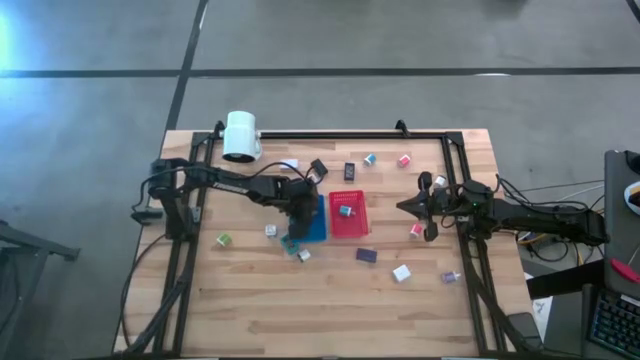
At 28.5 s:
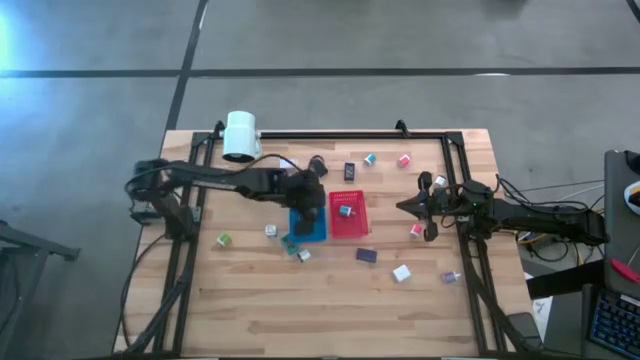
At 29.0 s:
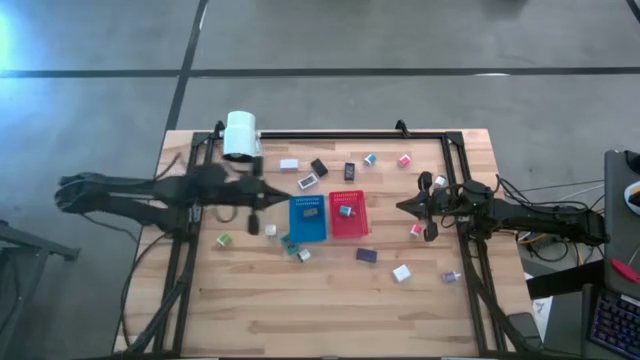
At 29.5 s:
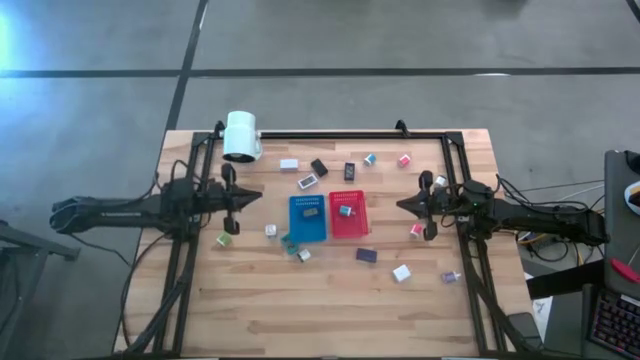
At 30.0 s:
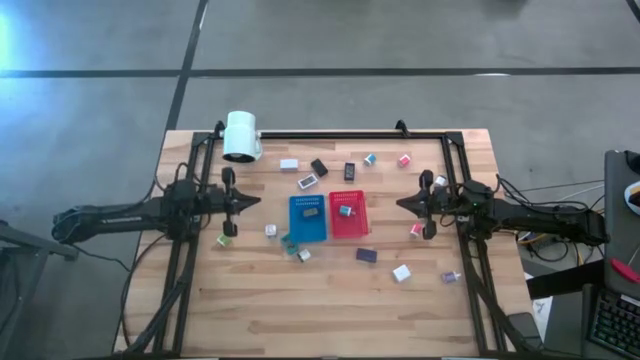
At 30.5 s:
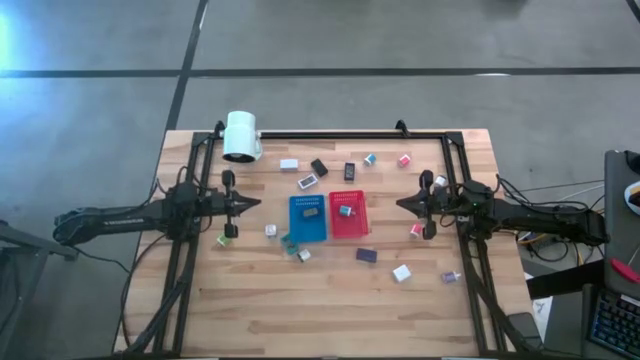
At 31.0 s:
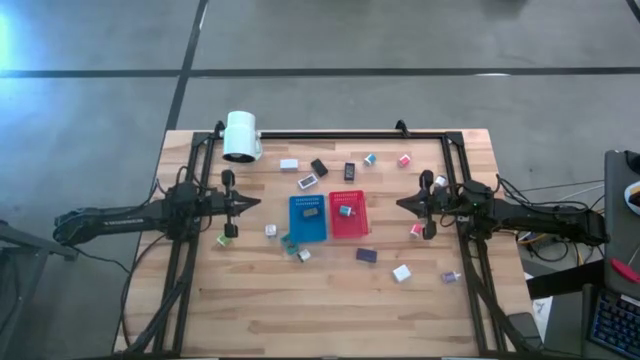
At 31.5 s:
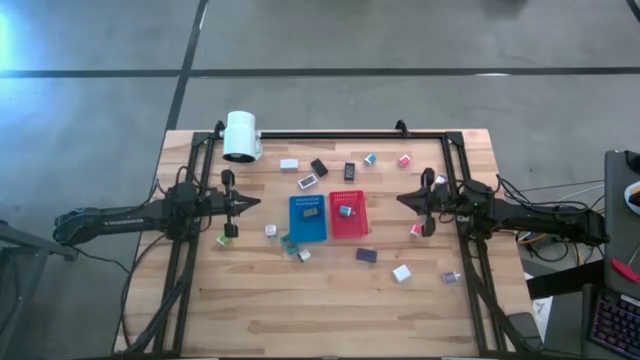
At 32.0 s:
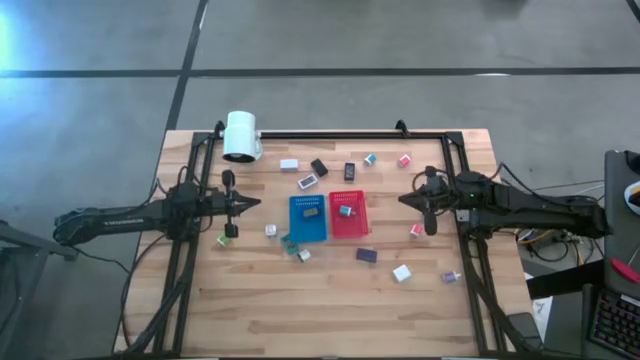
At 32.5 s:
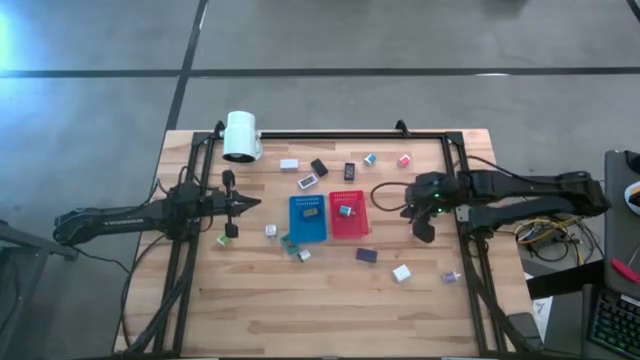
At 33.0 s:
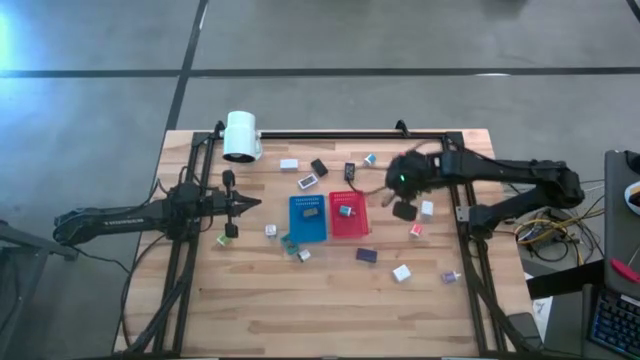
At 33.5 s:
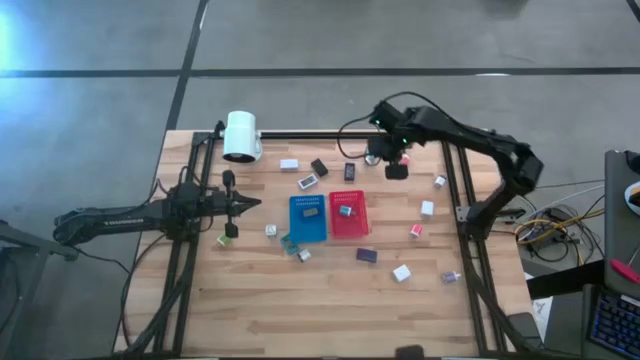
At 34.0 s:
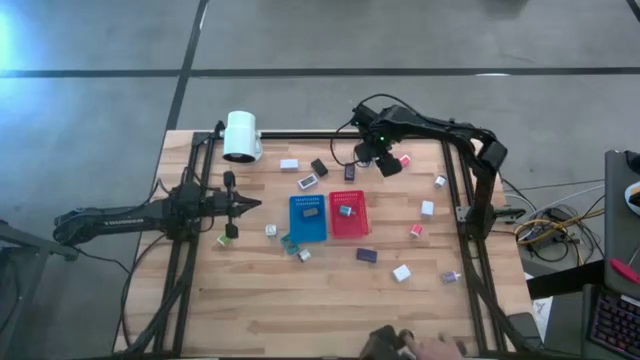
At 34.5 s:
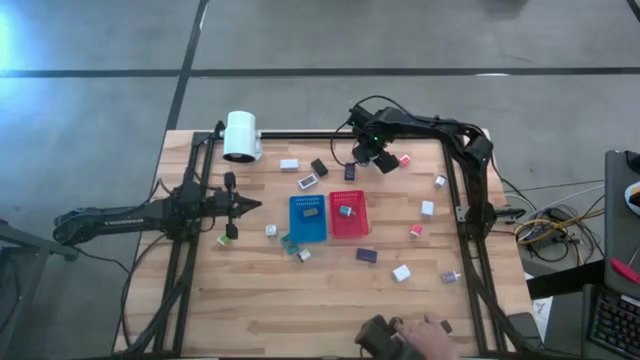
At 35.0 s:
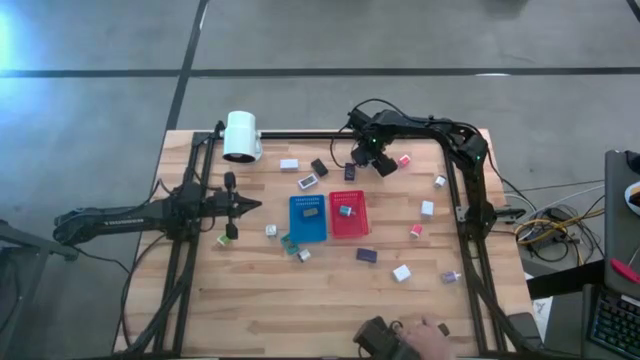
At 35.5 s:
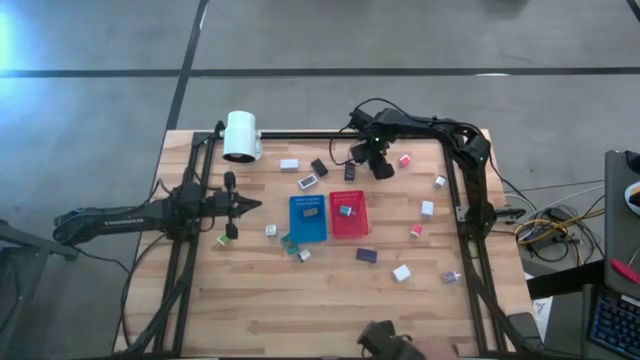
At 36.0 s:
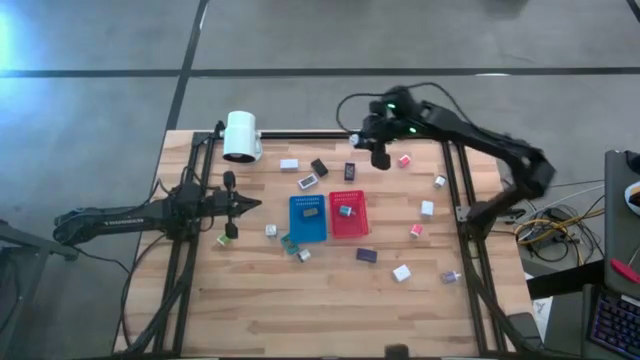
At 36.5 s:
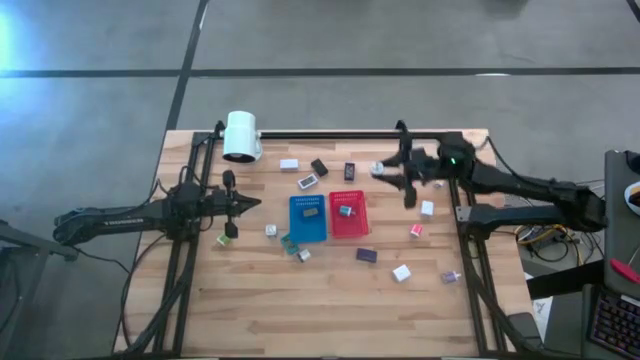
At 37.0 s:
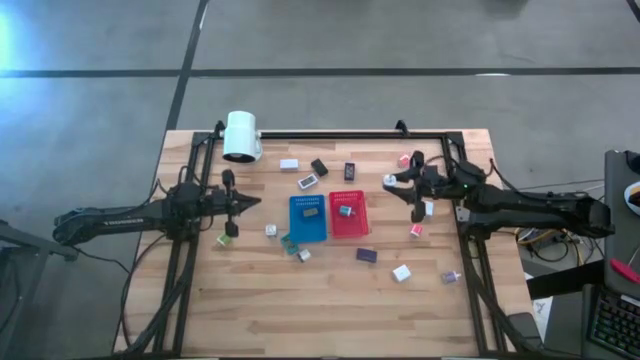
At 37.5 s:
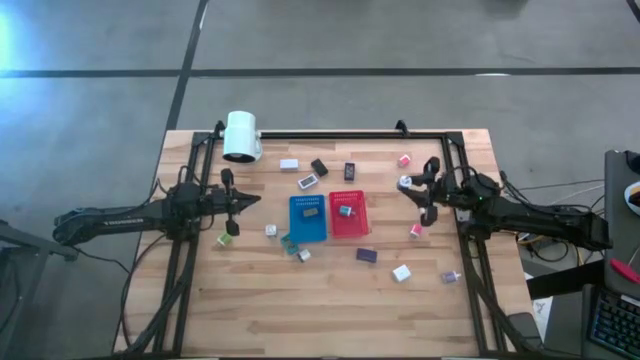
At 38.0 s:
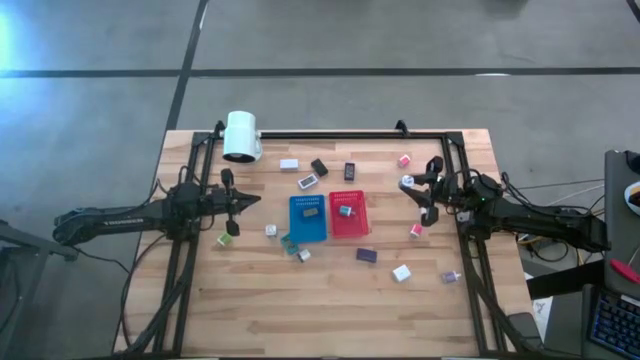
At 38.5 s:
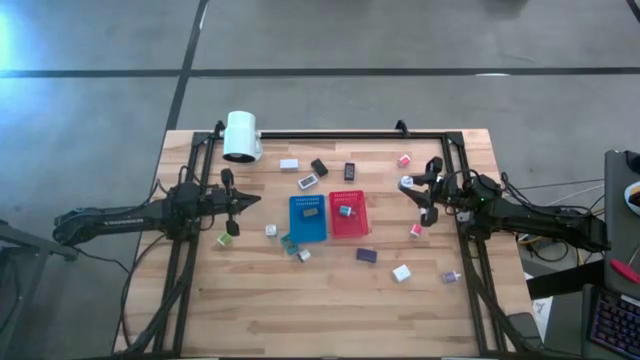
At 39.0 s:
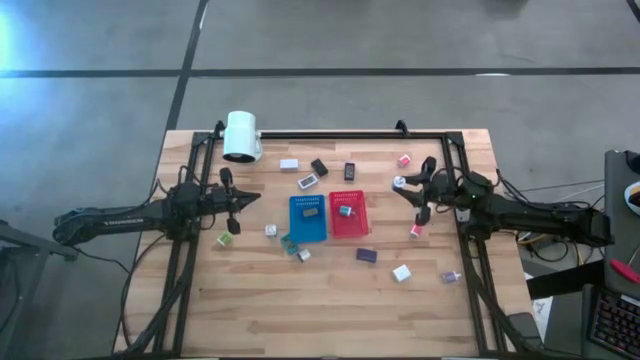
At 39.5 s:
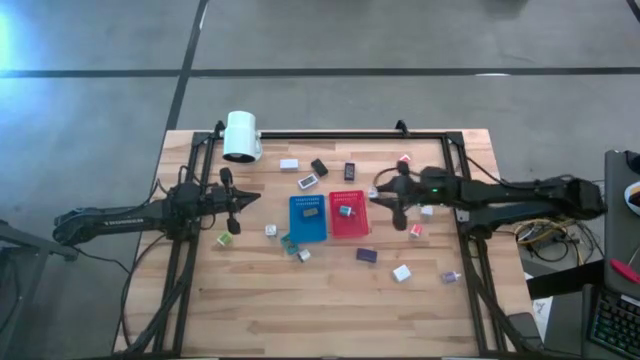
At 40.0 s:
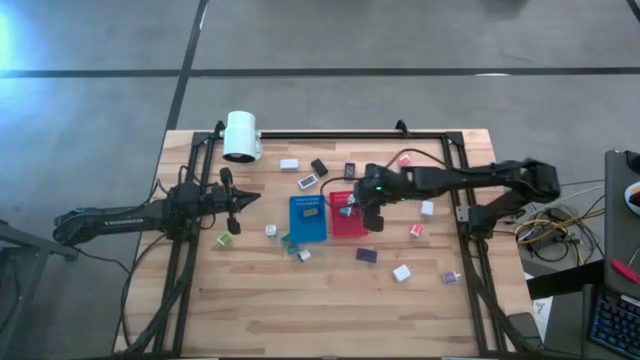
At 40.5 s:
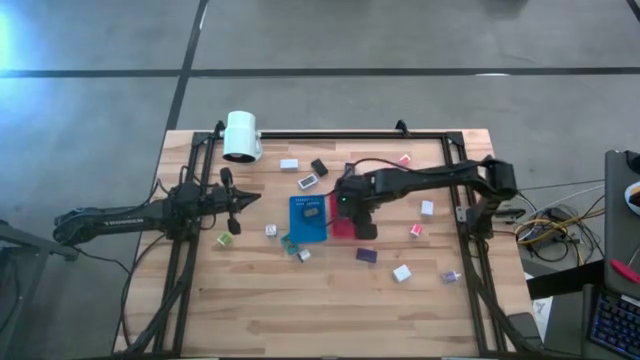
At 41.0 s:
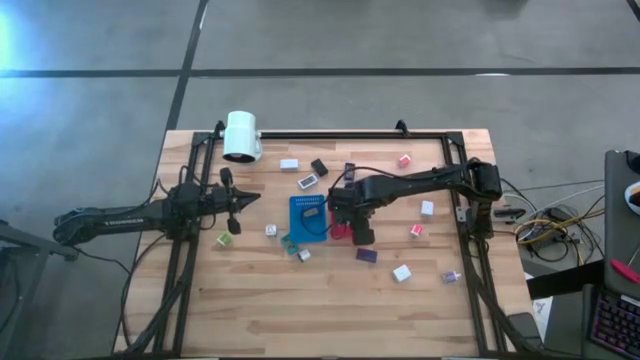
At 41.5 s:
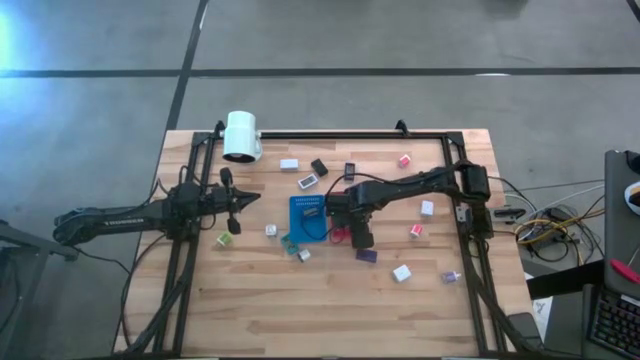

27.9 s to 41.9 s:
Task: Pick & Place Office items
Put the light blue plug charger into the red bin

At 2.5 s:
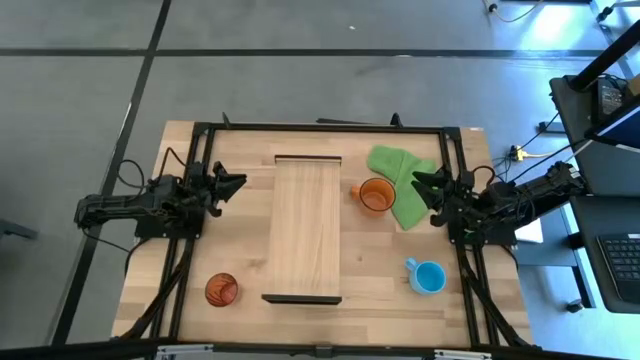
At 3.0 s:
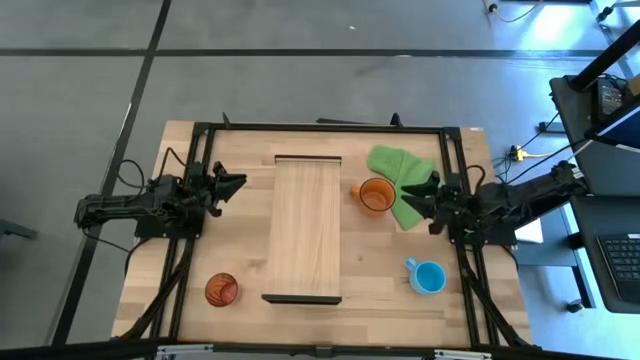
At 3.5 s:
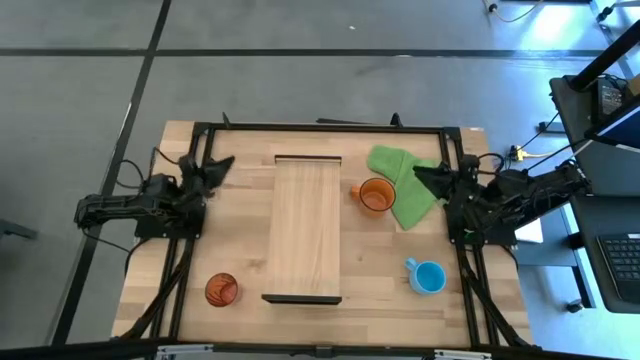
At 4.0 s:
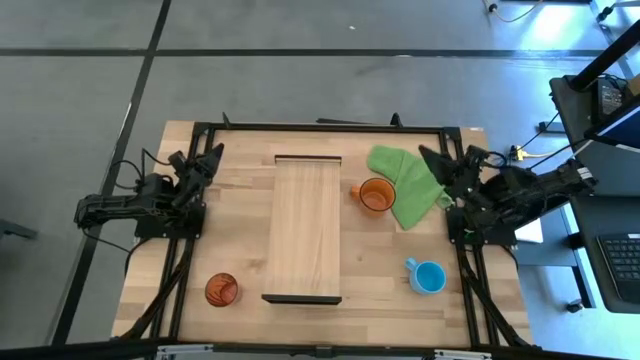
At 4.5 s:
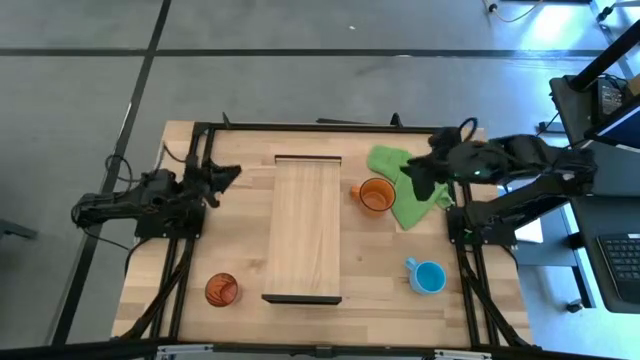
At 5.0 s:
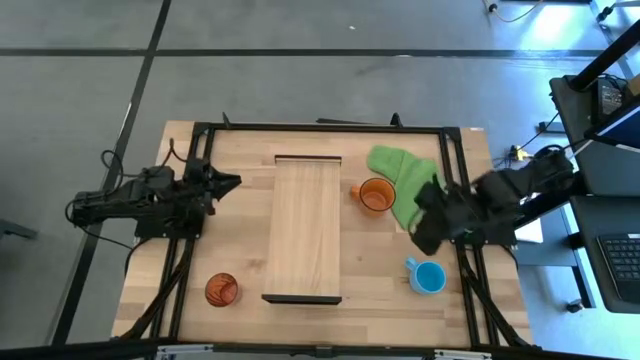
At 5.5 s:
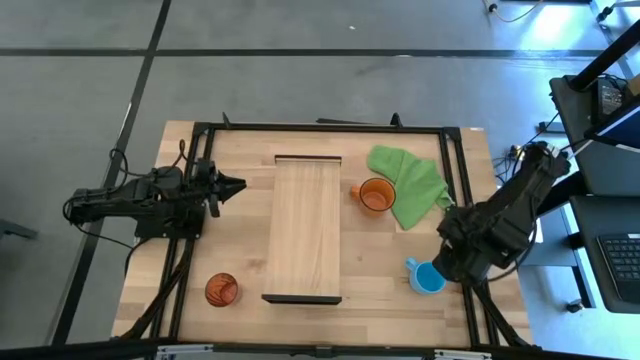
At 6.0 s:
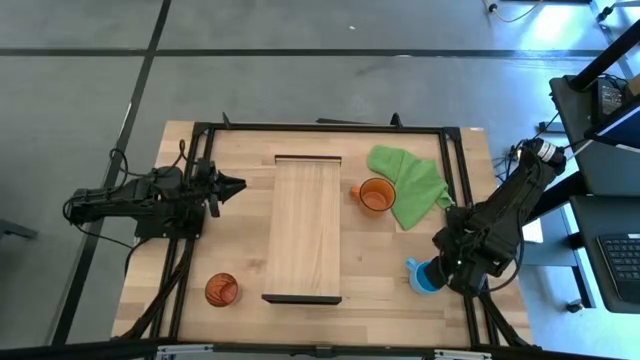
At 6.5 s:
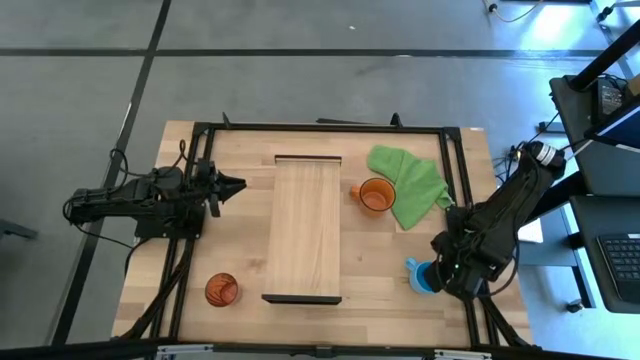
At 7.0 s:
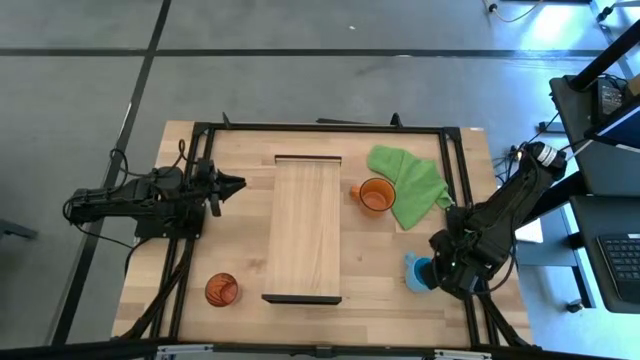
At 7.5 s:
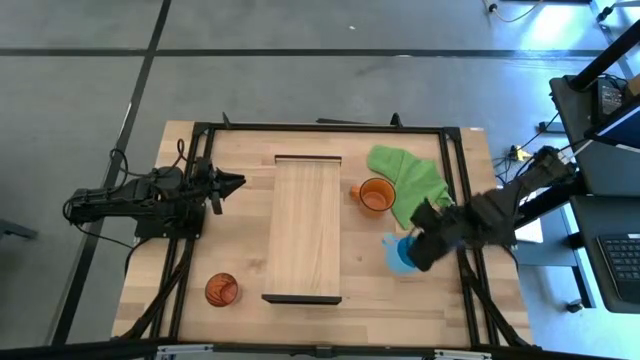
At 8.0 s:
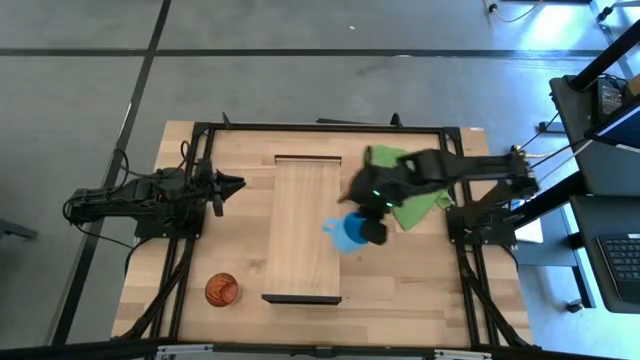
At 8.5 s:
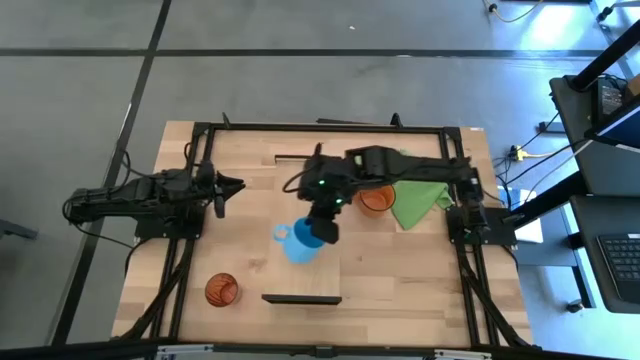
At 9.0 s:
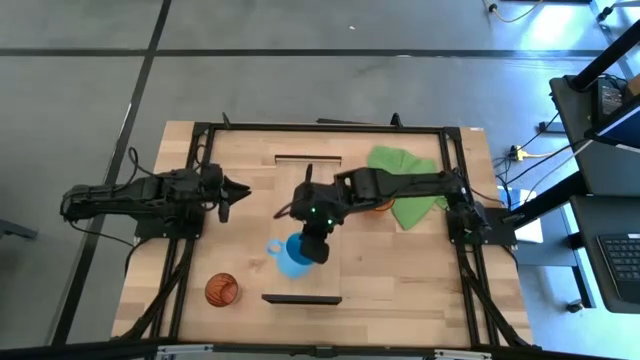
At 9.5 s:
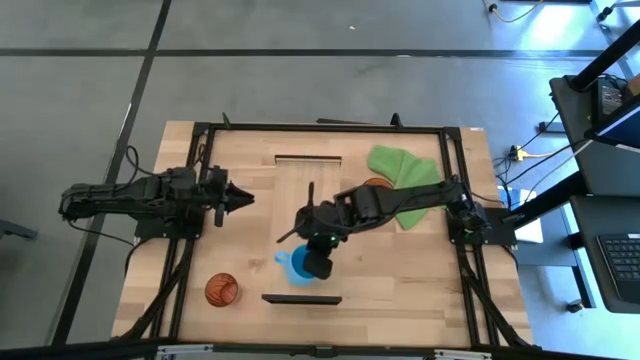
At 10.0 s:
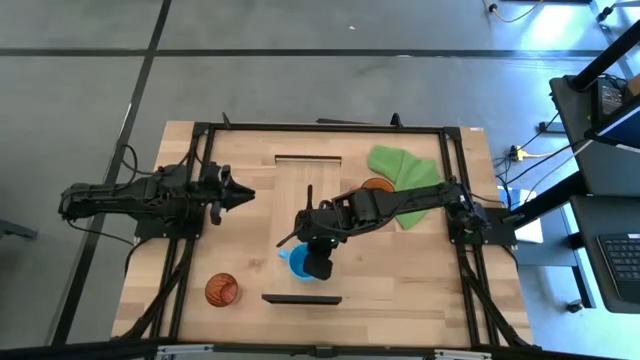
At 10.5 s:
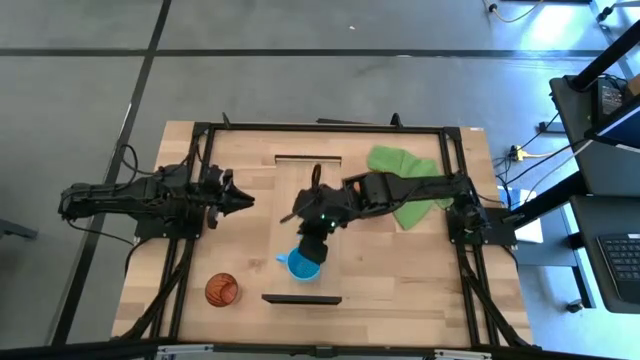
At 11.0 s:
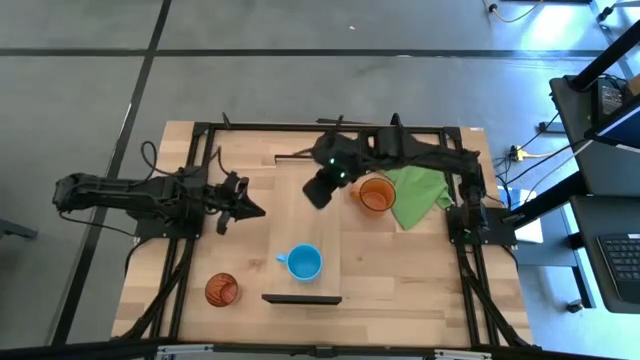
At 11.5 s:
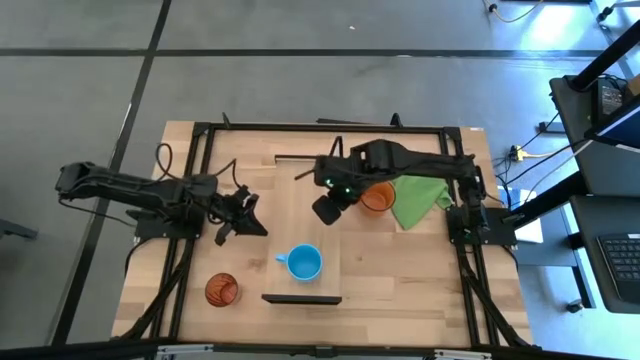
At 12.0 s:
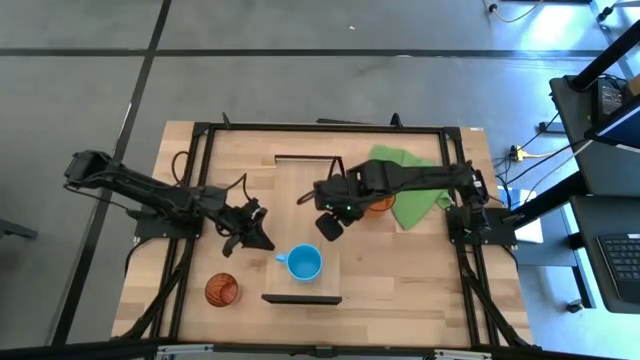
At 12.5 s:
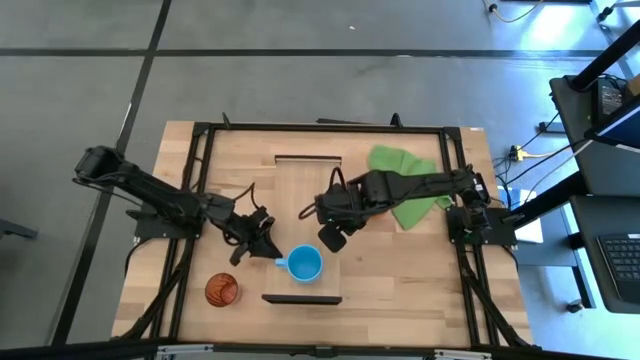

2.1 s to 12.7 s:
Task: Stack small to large cups/mugs on shelf
Put the blue mug on the shelf
